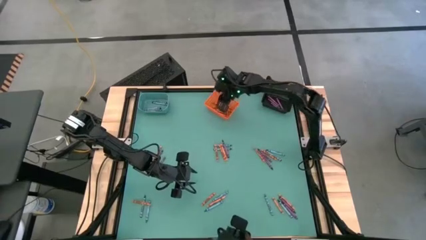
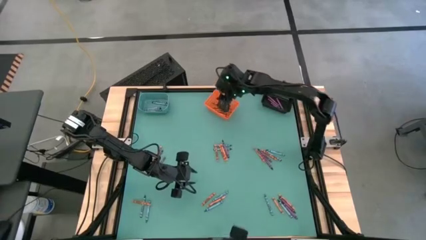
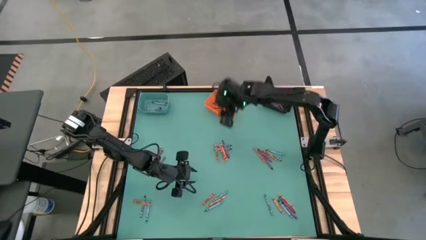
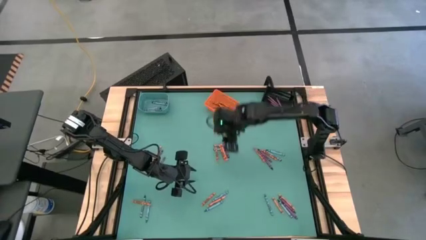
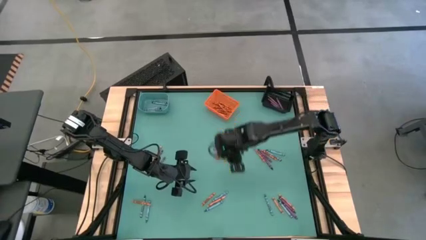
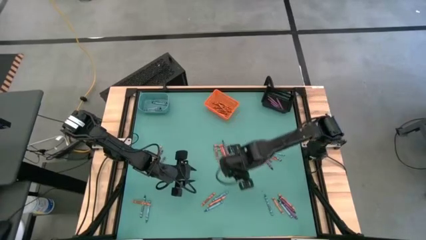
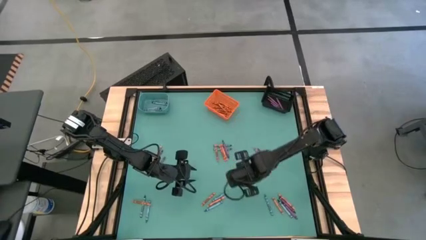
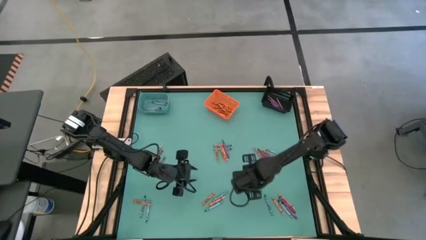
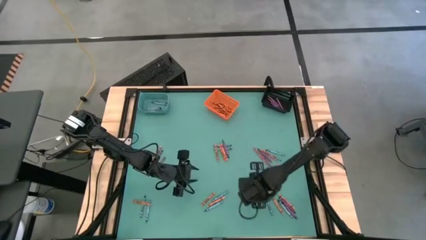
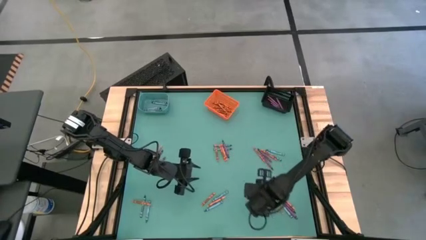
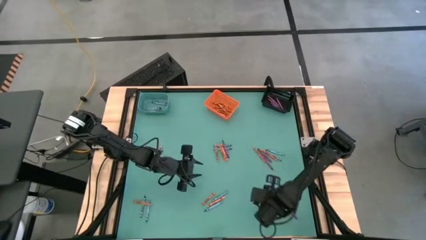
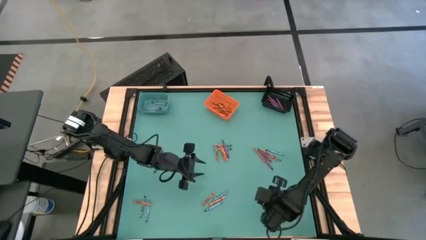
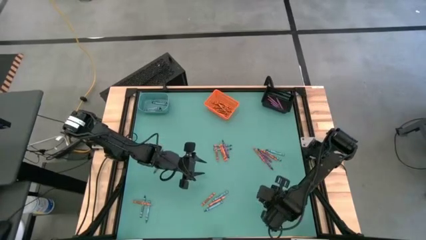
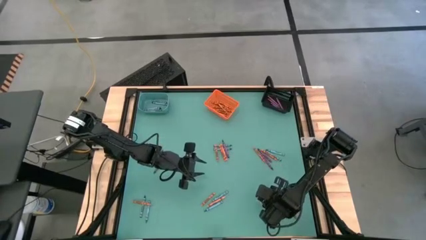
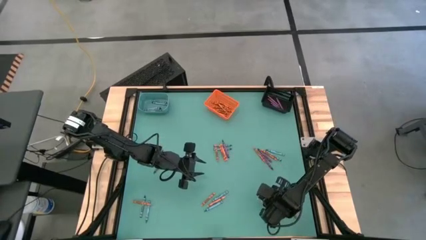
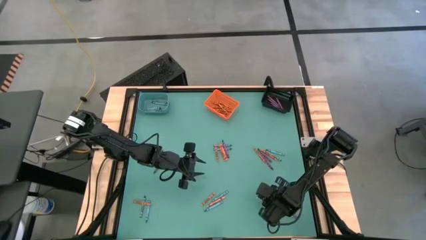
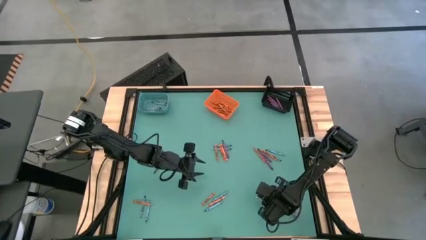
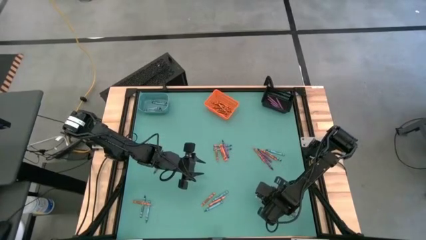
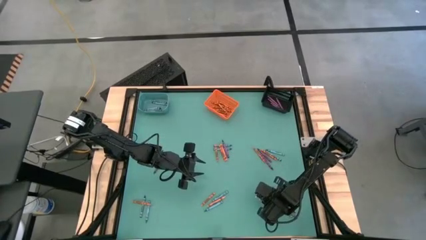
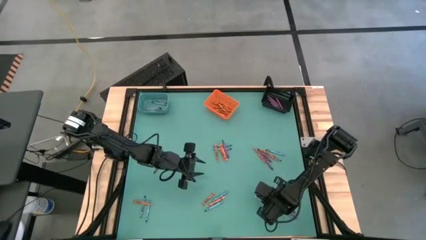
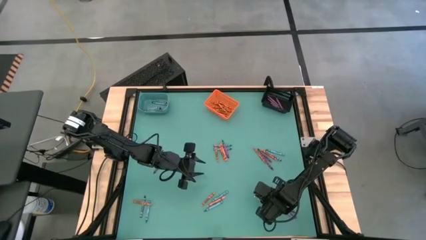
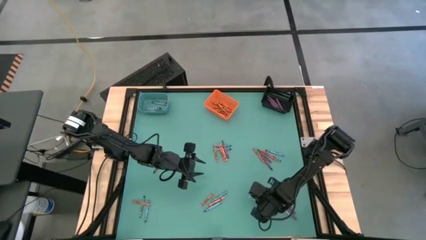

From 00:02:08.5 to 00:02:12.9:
Task: Sort crayons
Put the blue crayon into the blue bin

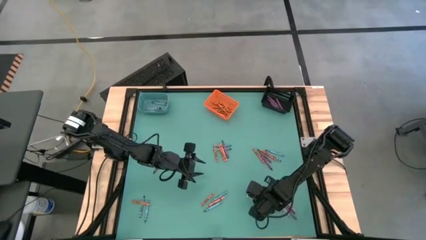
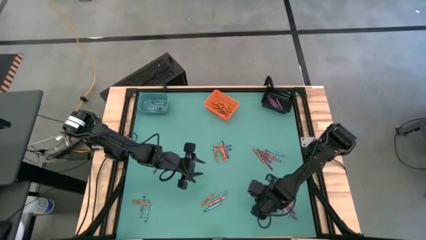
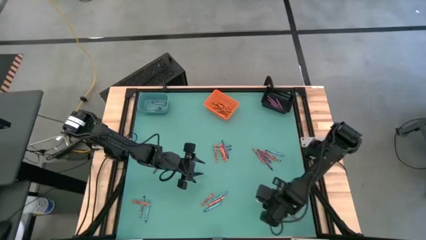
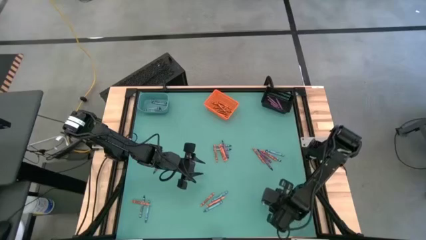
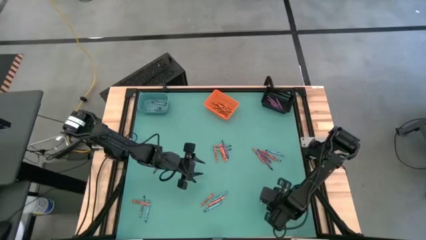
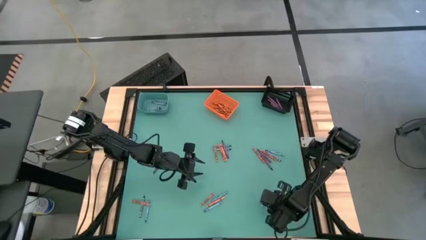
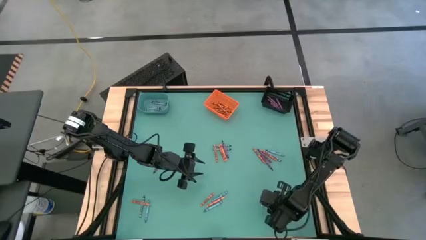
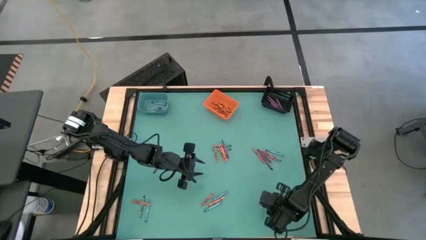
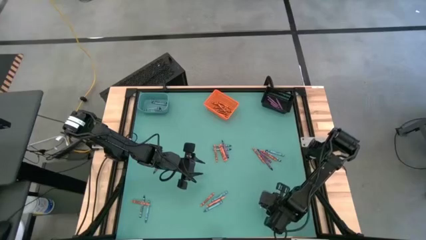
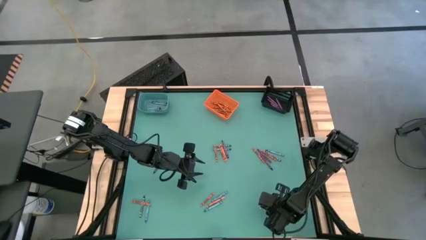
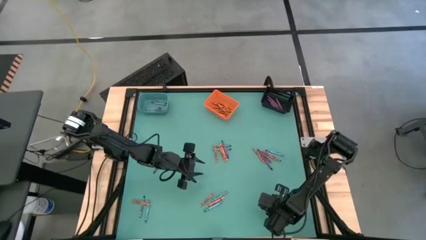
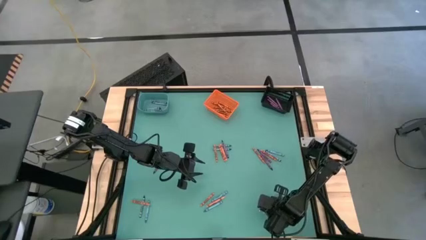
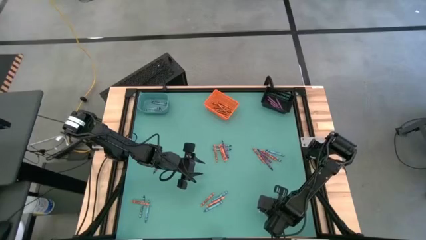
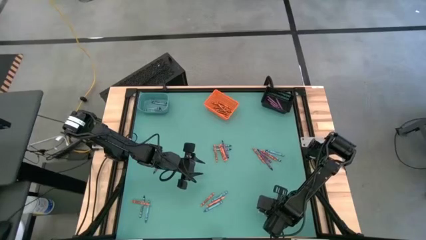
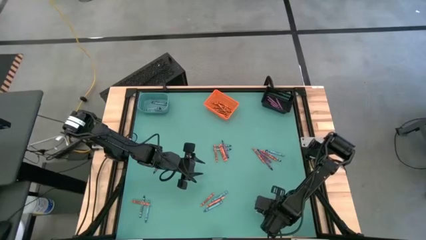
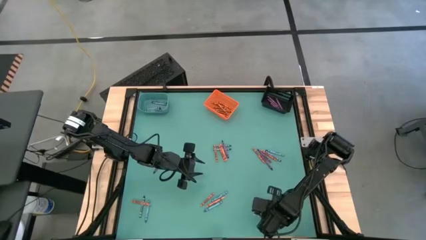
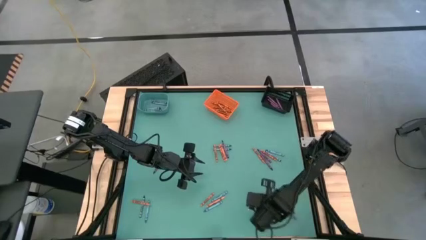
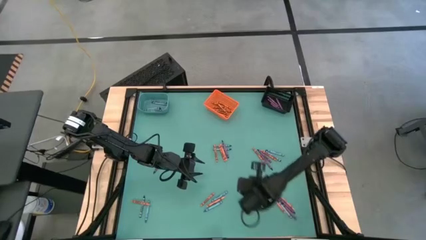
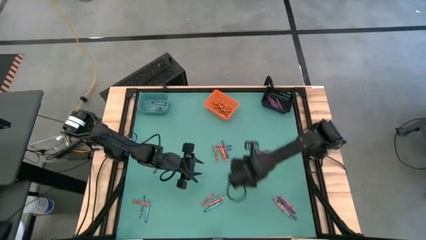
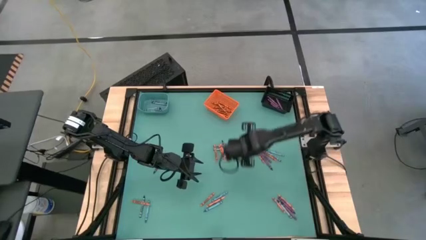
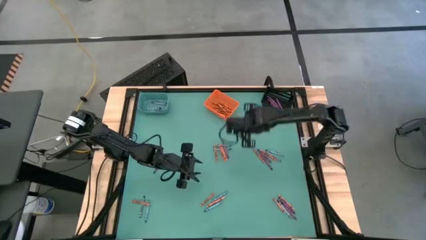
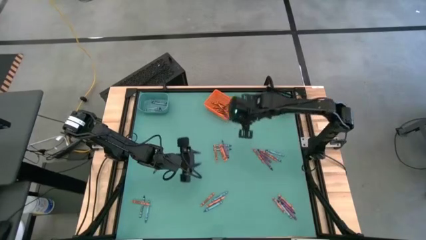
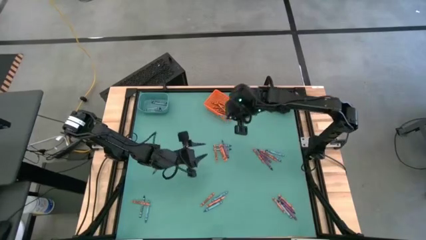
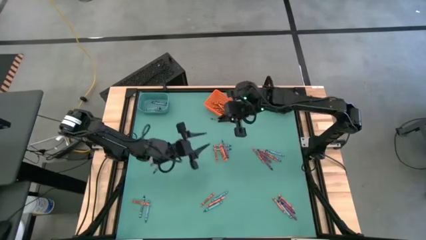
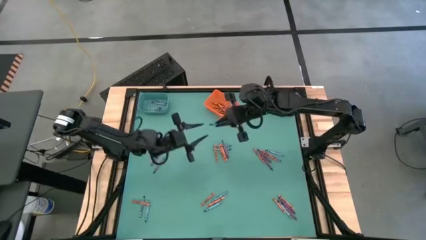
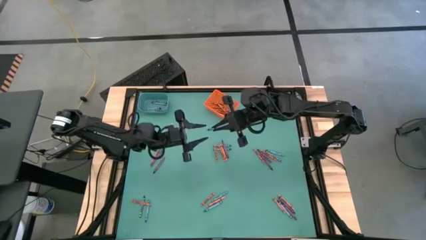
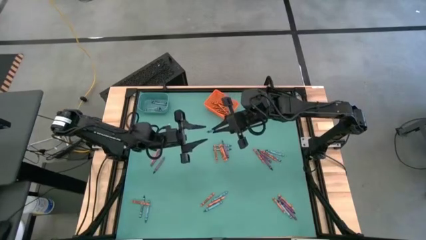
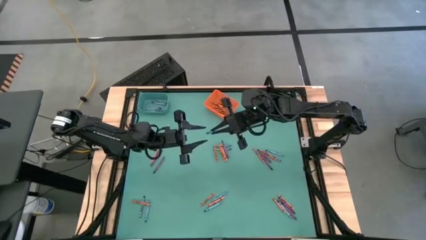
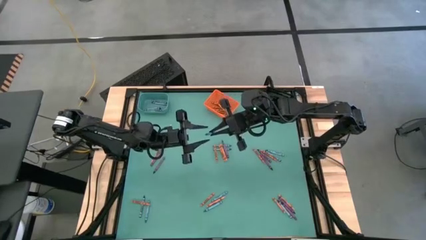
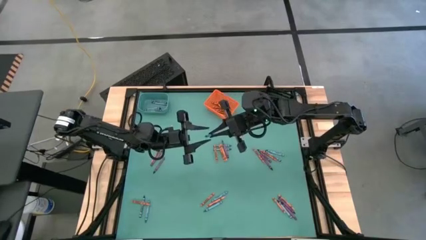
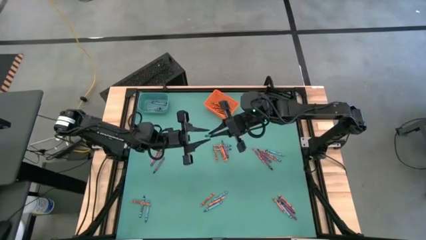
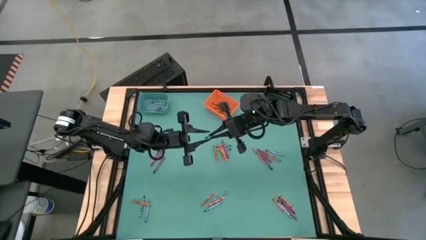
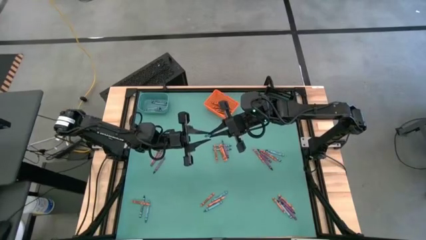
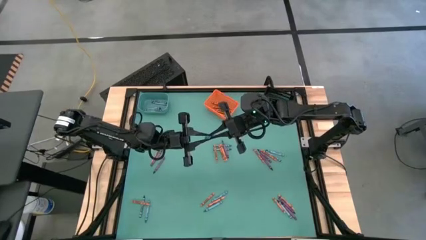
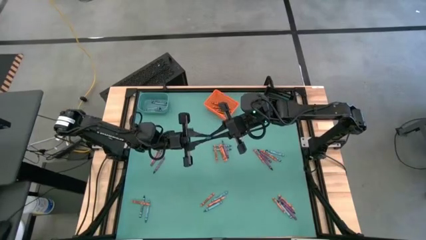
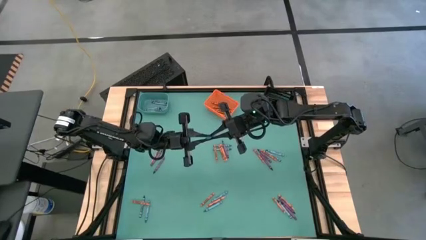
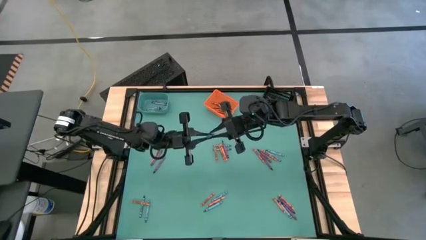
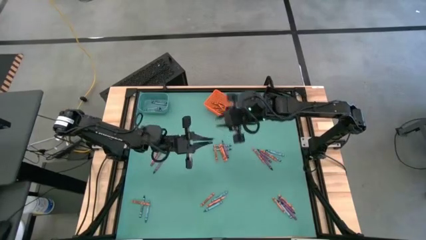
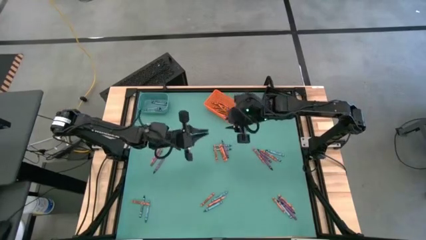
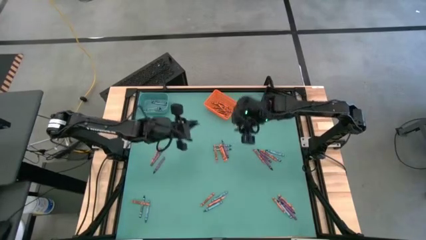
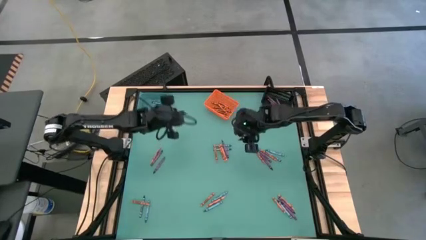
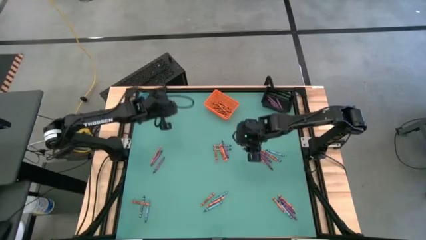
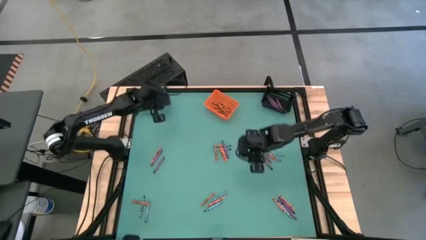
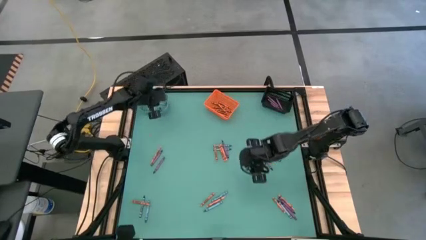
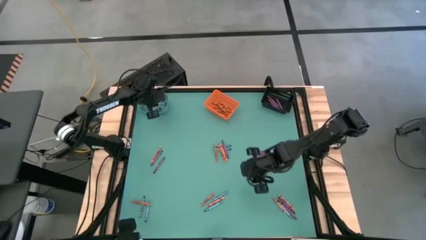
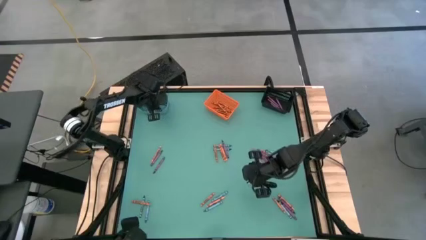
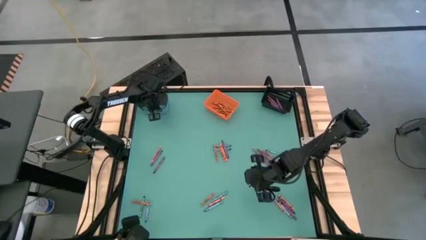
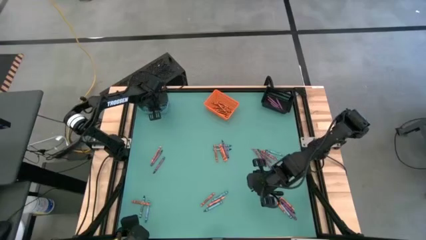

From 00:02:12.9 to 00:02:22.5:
Put the blue crayon into the blue bin

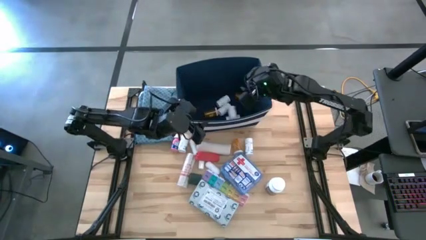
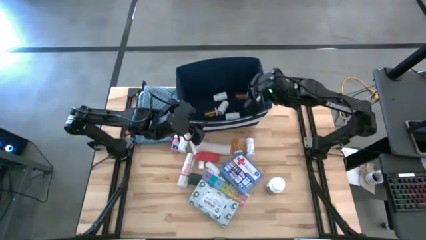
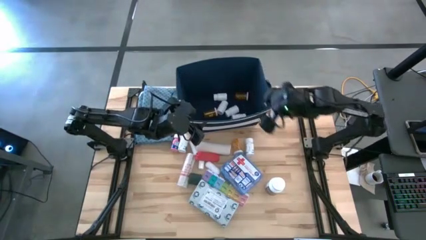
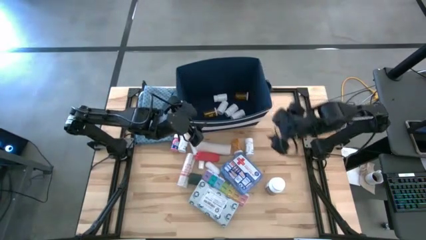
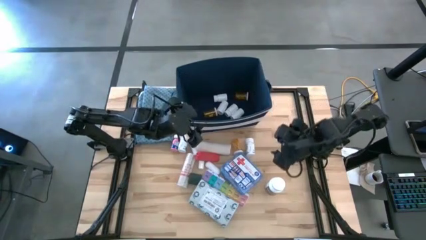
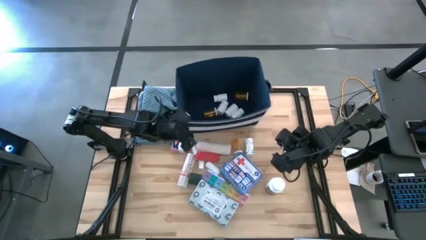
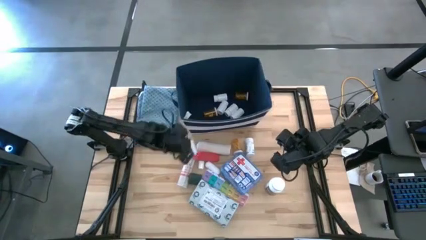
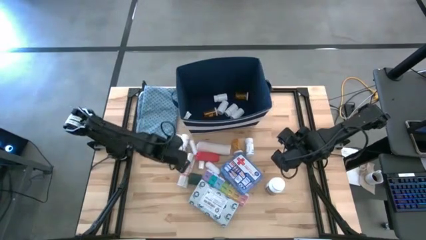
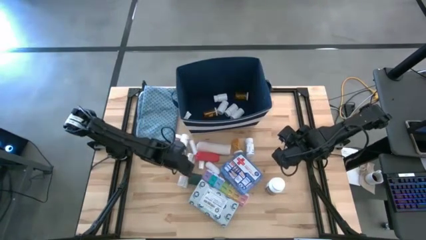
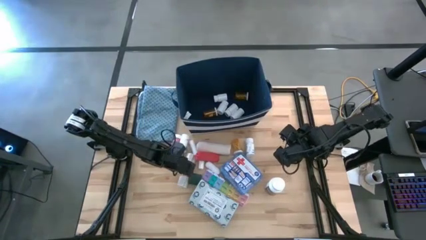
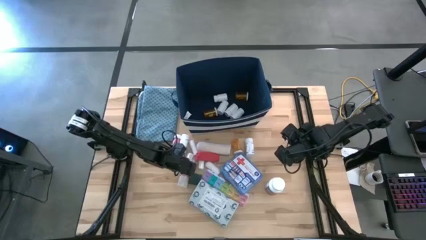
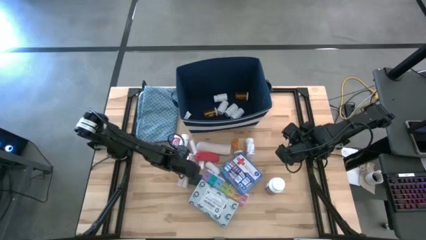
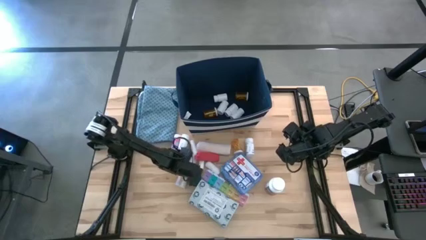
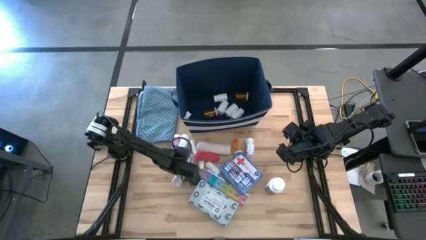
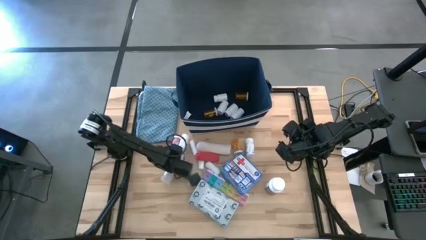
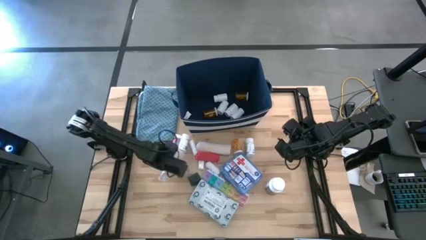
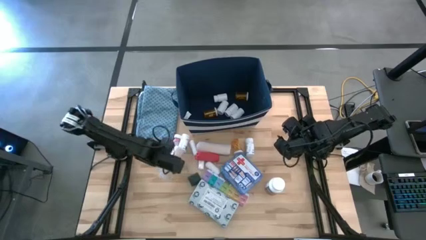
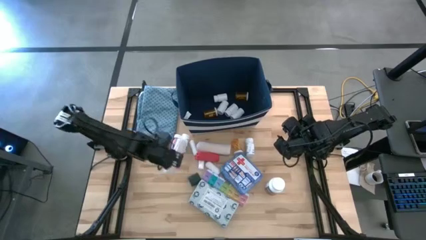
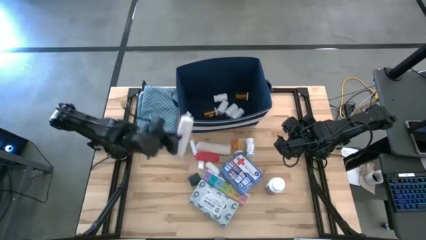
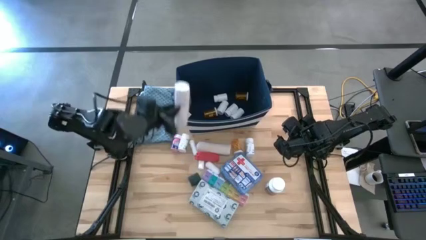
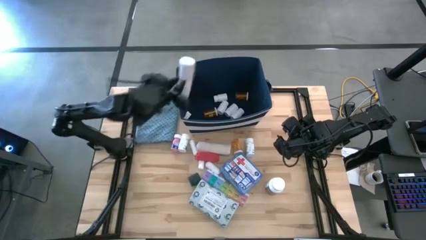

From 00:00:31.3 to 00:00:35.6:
Task: Pick & place medical supplies in basket/bin
Put the large brown bandage into the blue bin
